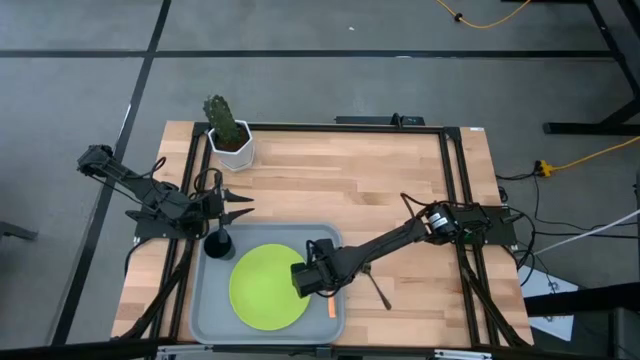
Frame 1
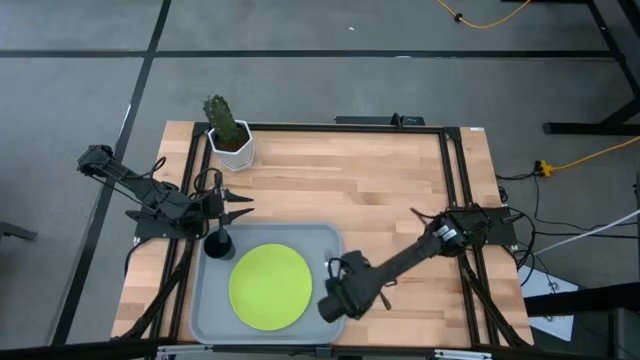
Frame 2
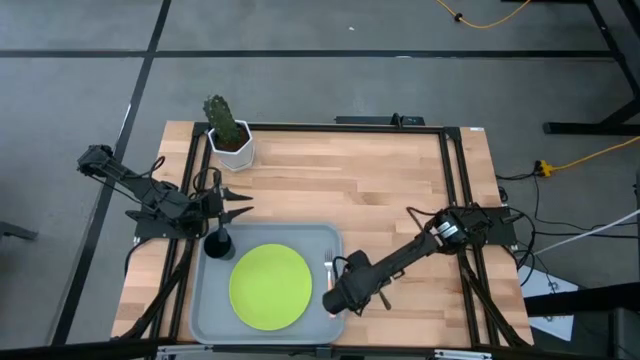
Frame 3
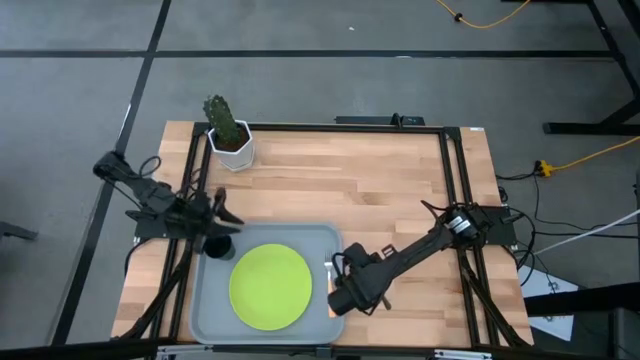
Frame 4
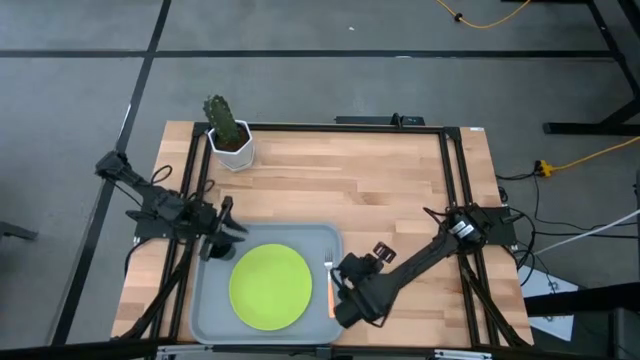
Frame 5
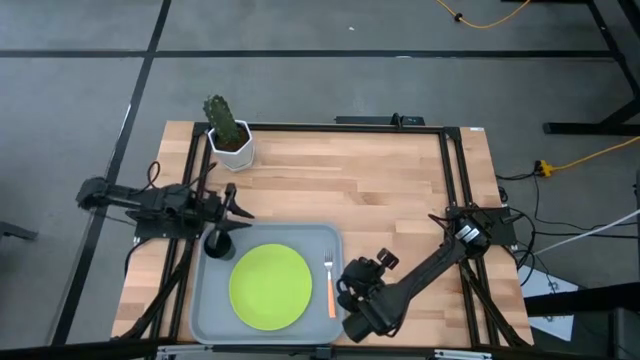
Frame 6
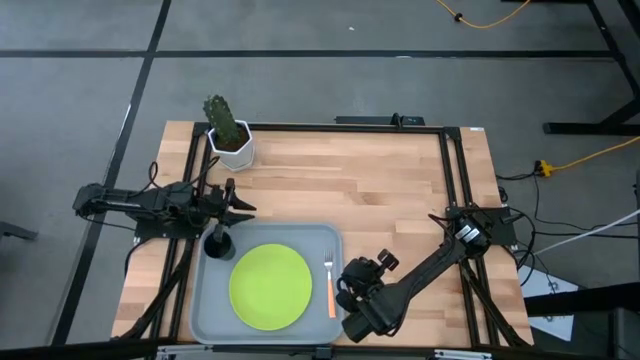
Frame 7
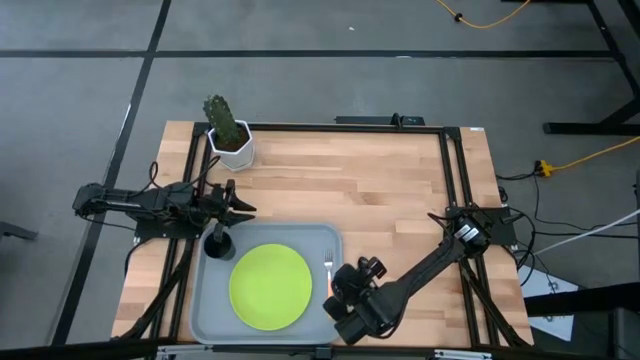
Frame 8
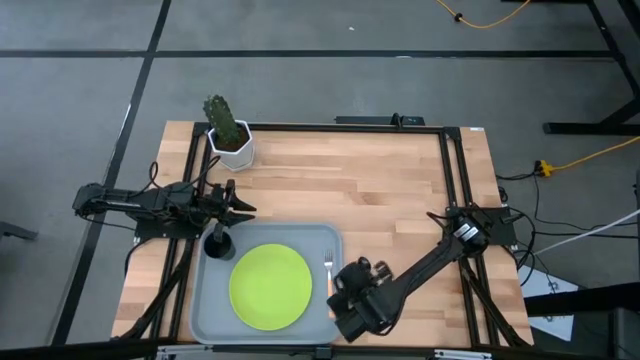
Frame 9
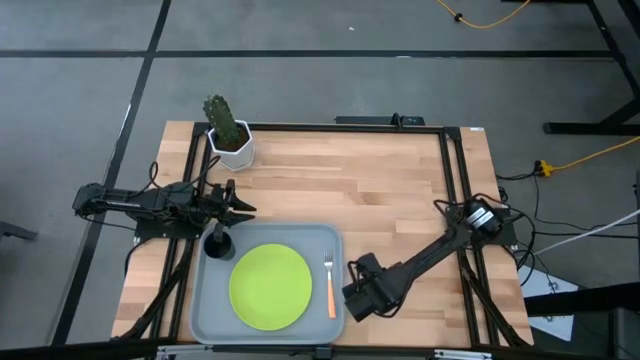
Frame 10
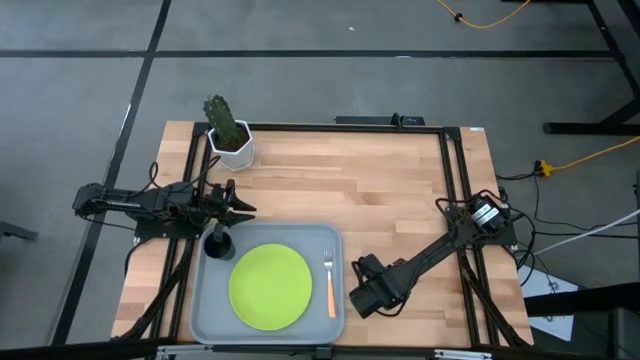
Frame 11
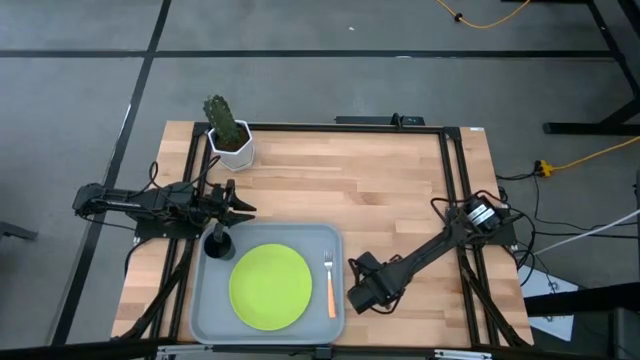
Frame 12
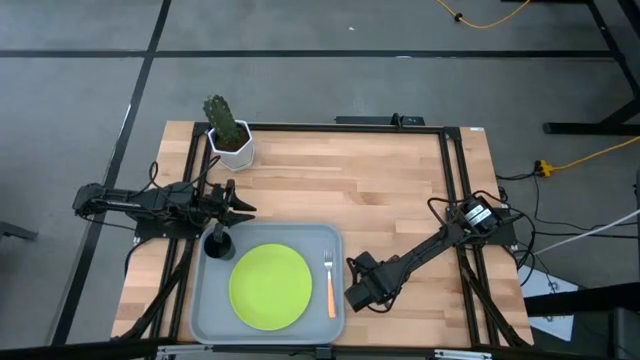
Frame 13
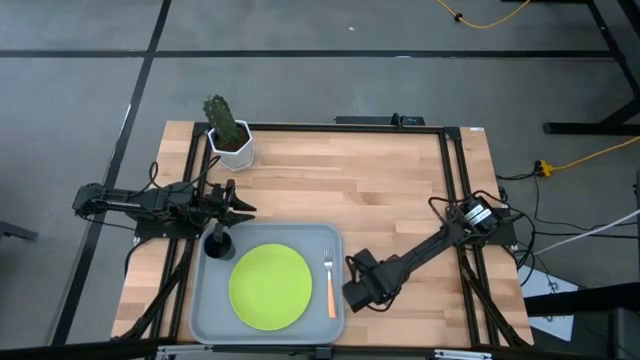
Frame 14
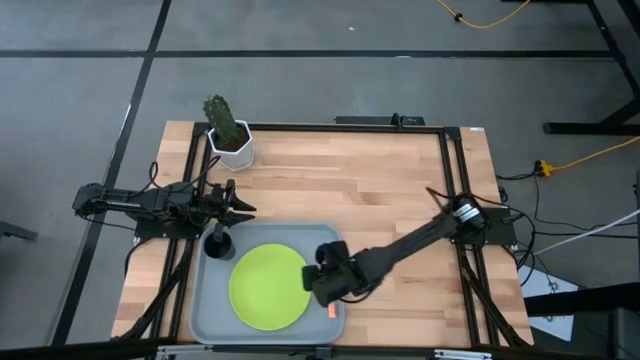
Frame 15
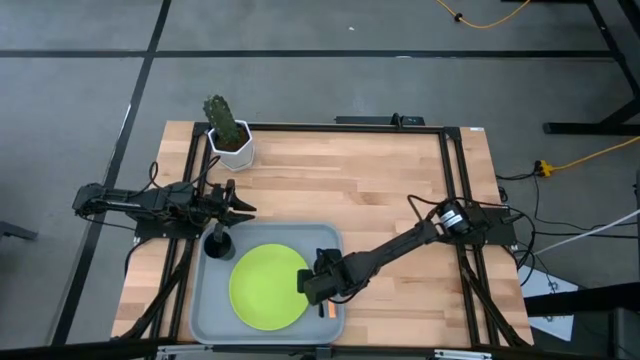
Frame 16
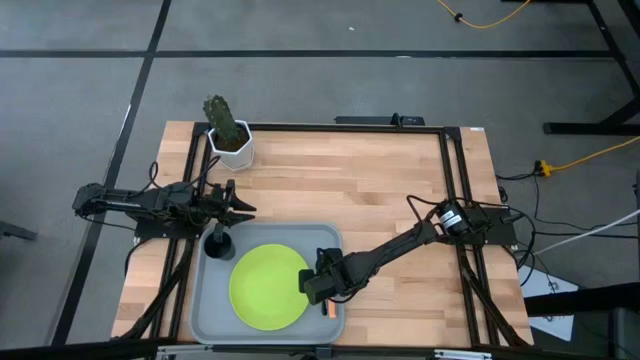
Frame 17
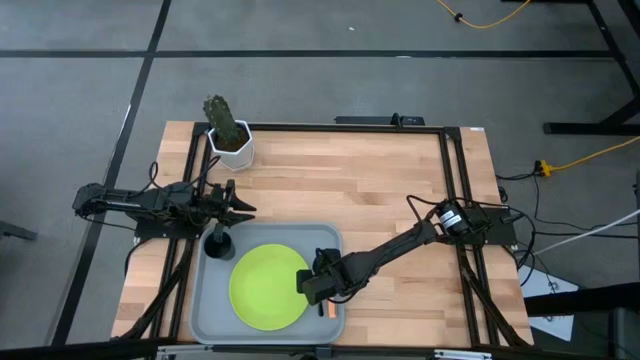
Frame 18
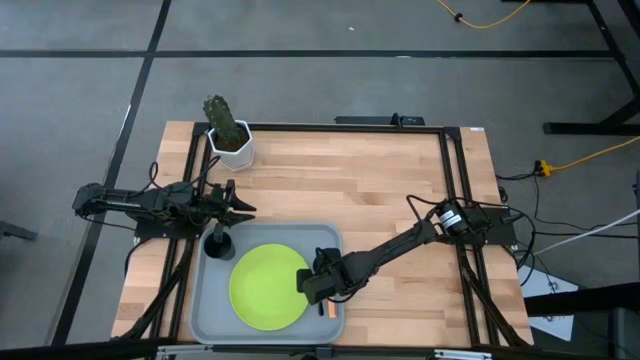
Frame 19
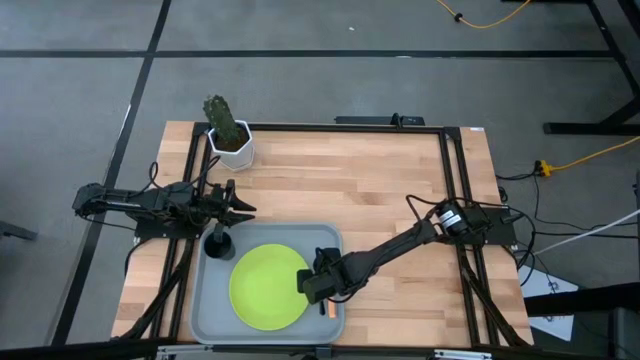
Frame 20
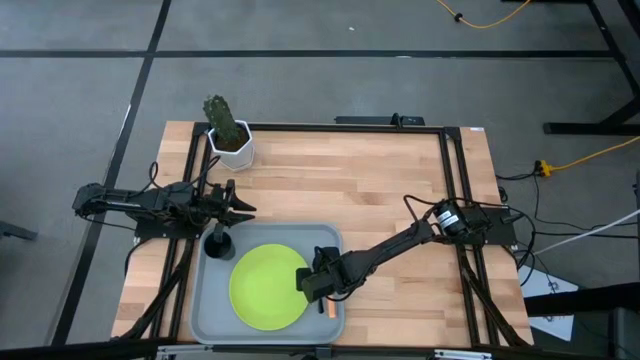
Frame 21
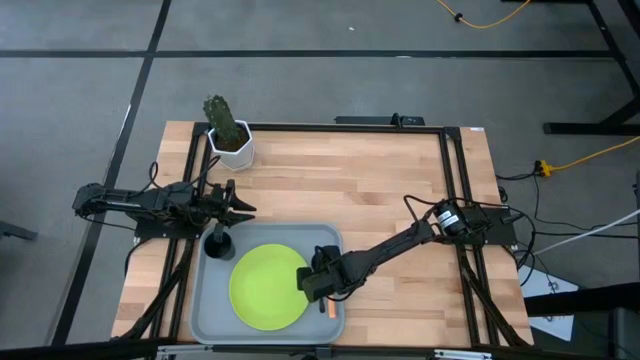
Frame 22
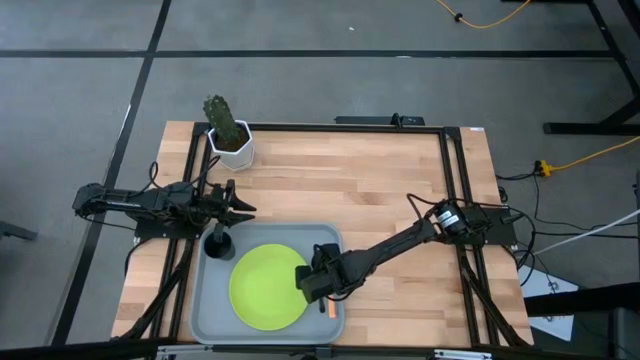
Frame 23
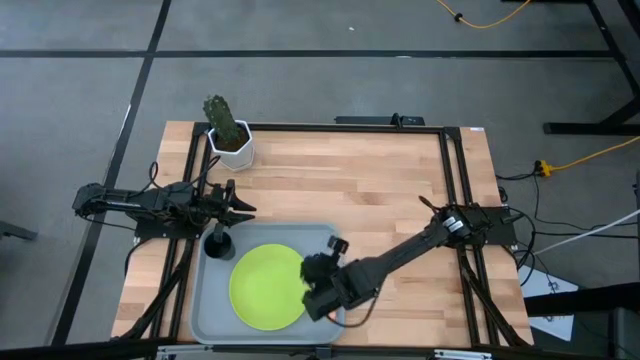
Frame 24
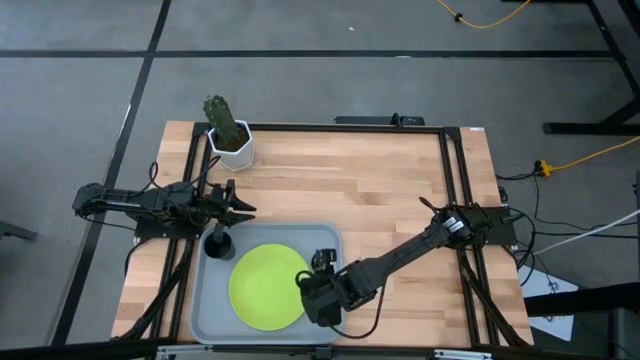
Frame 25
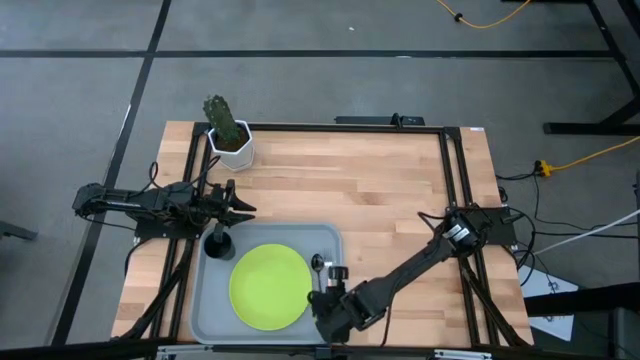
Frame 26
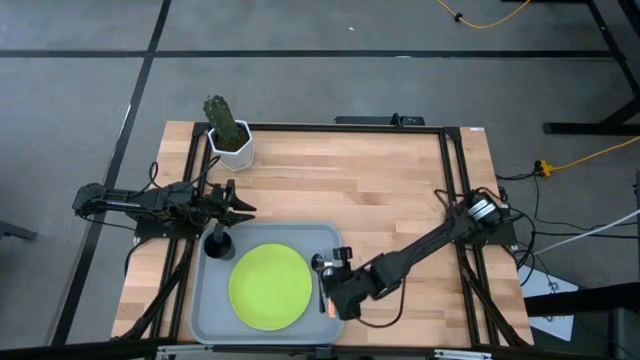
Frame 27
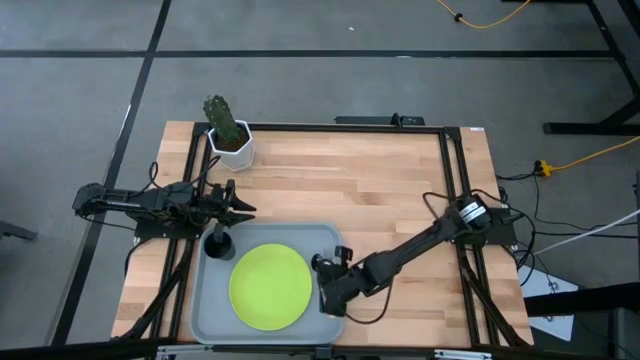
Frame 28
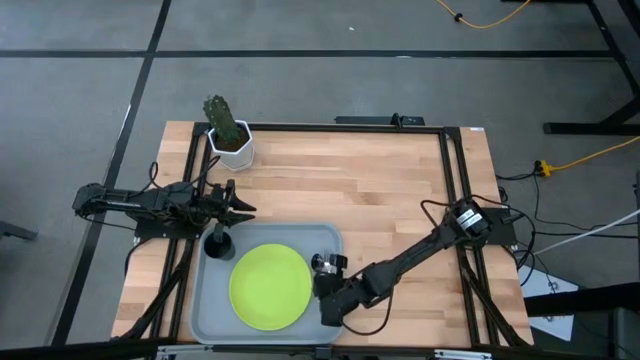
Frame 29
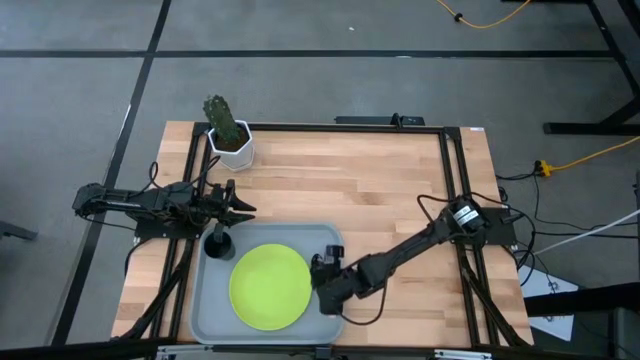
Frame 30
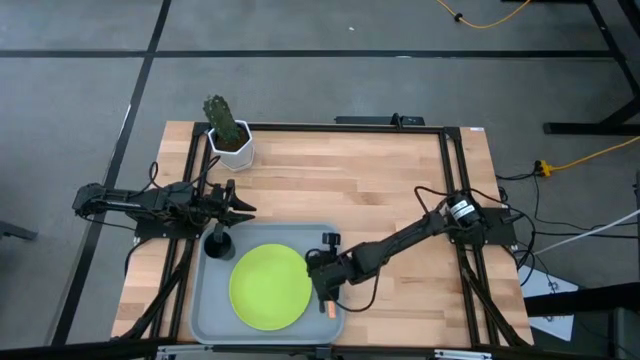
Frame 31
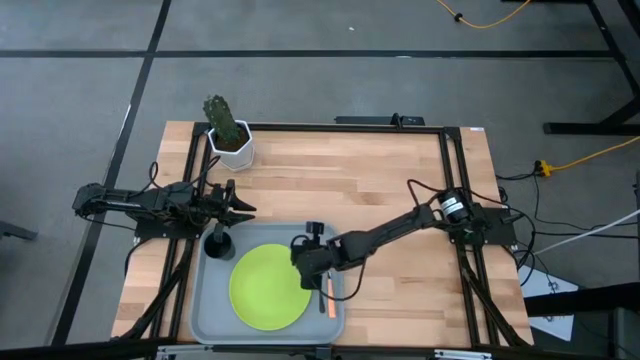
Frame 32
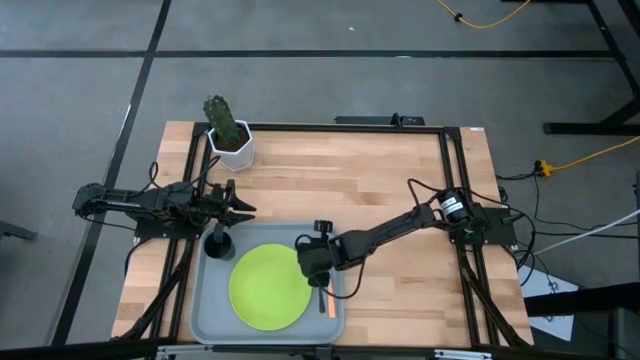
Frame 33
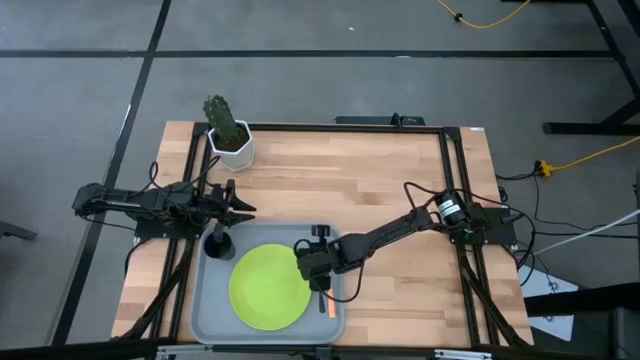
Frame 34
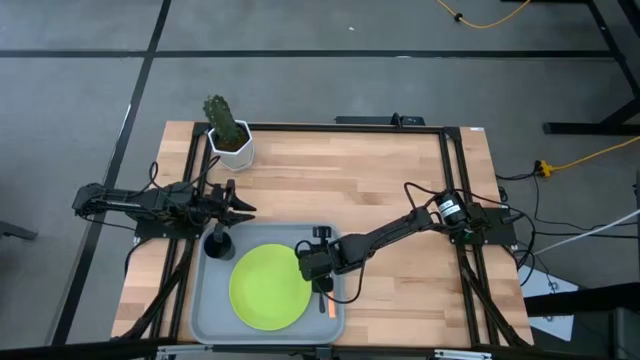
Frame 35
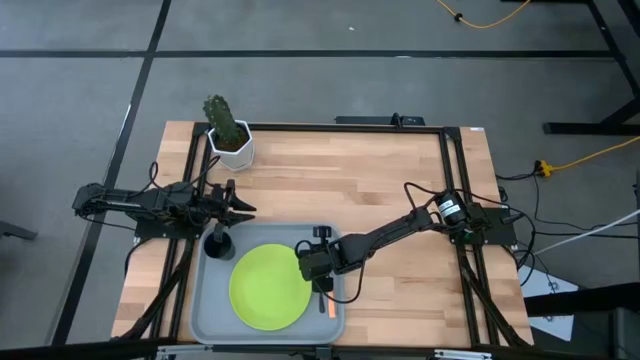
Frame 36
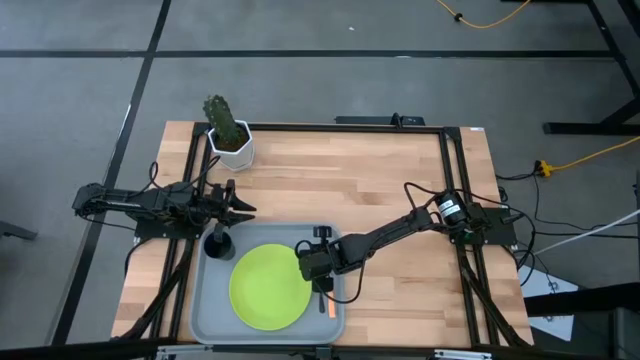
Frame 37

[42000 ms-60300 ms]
Task: Pick and place plate/cup/fork/spoon on tray
Put the black spoon on the gray serving tray to the left of the orange fork

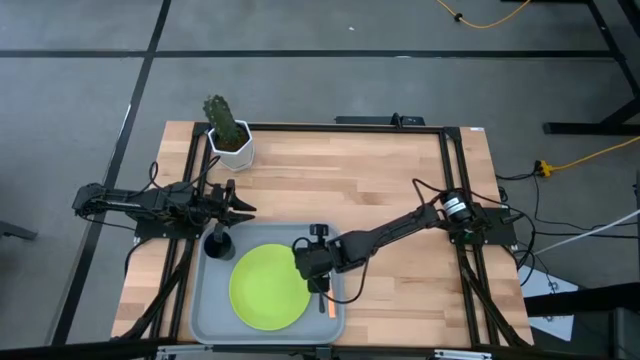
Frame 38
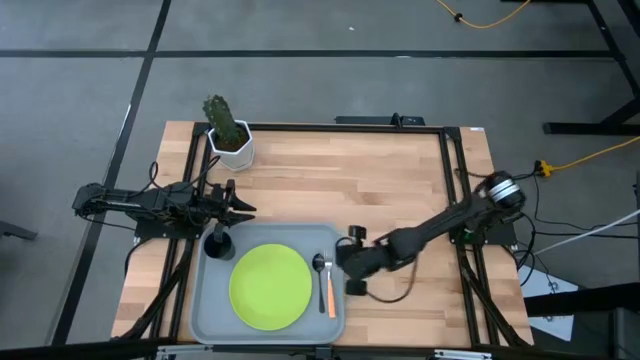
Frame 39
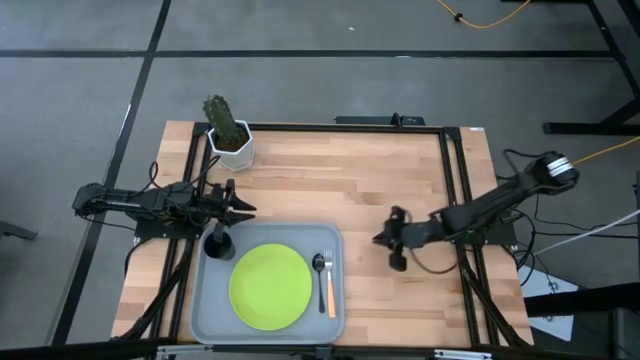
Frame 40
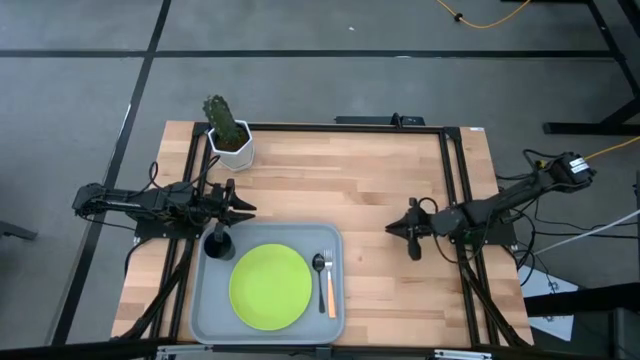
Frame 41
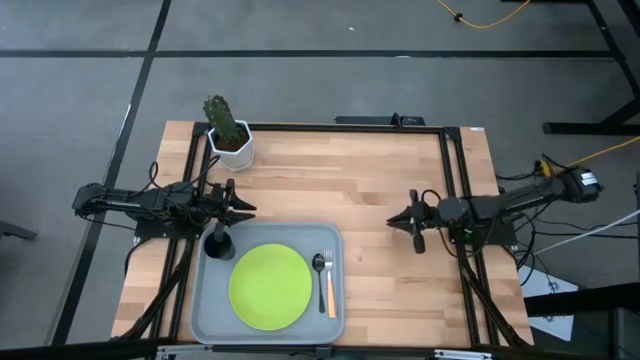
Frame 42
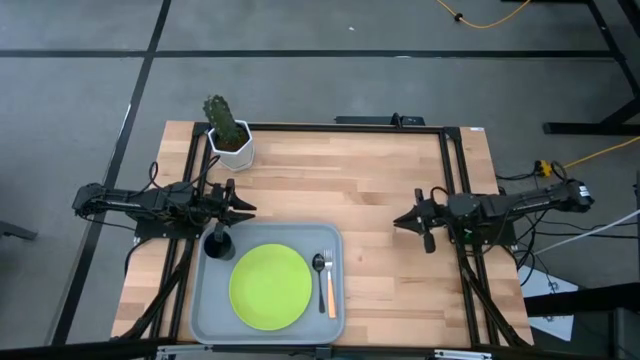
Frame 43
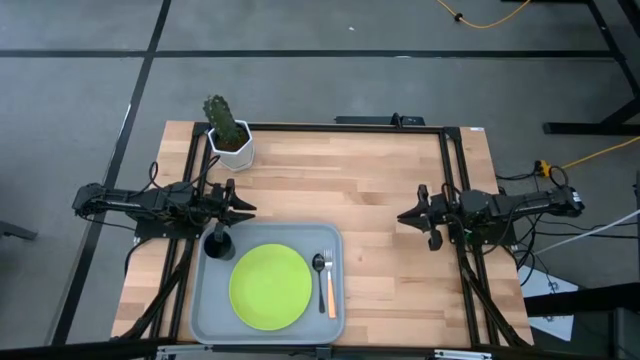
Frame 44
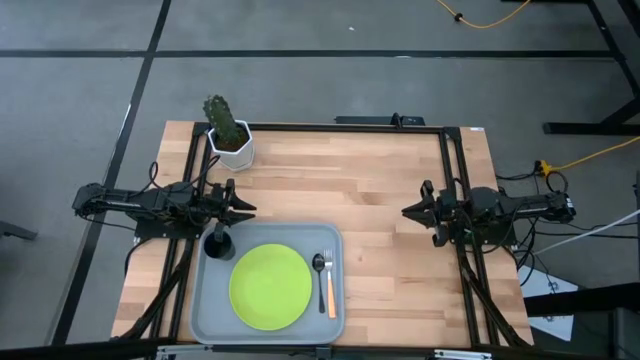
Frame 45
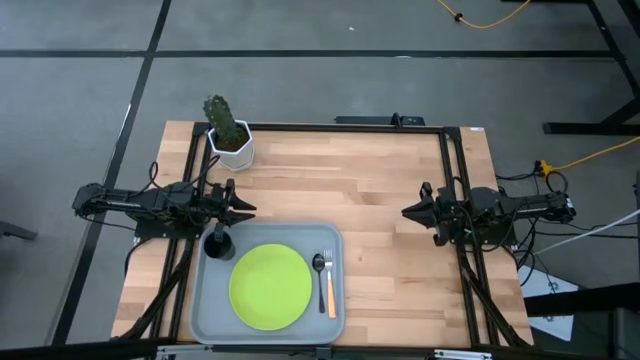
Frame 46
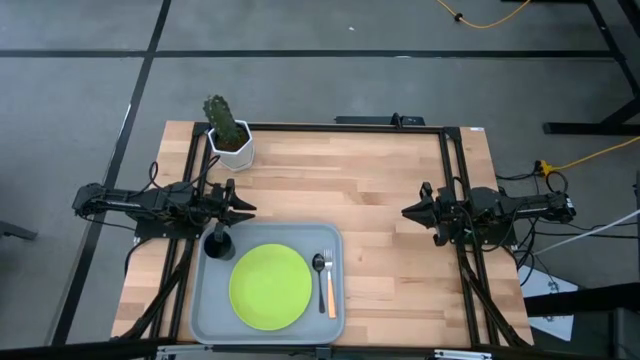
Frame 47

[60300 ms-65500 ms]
Return to Home Position
